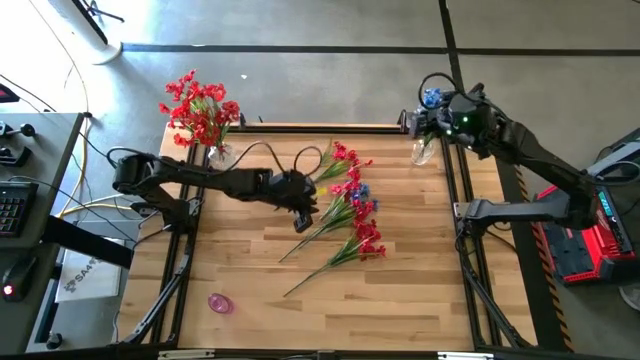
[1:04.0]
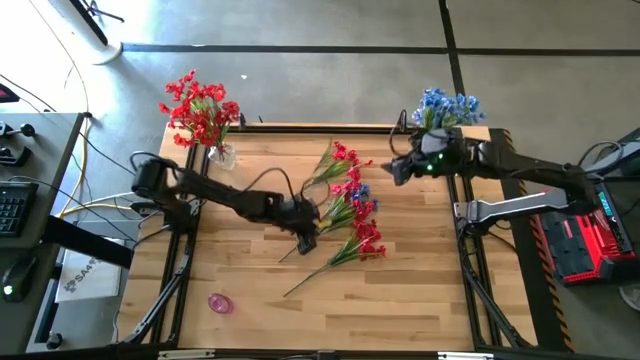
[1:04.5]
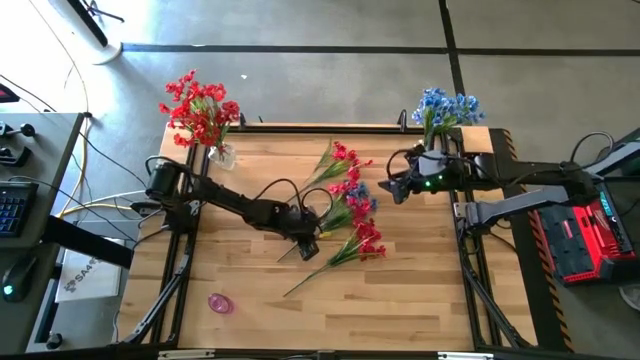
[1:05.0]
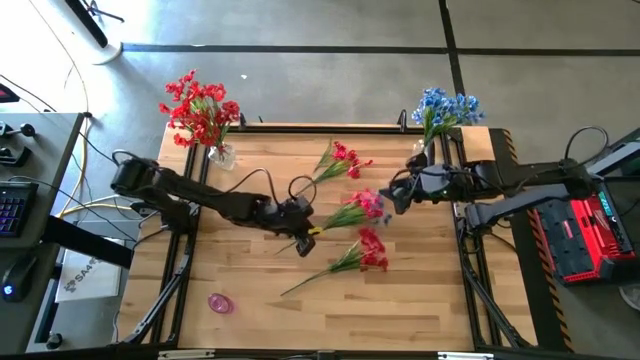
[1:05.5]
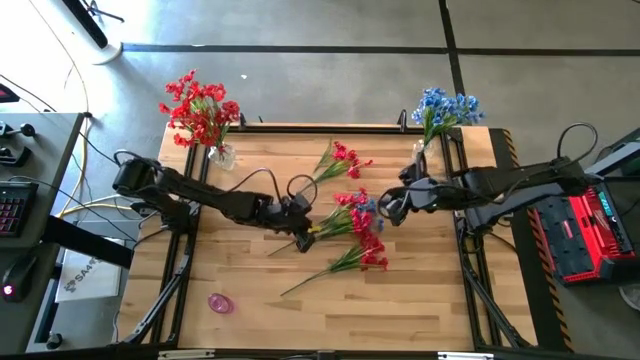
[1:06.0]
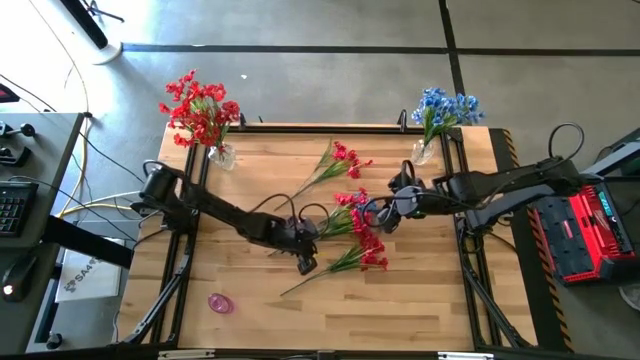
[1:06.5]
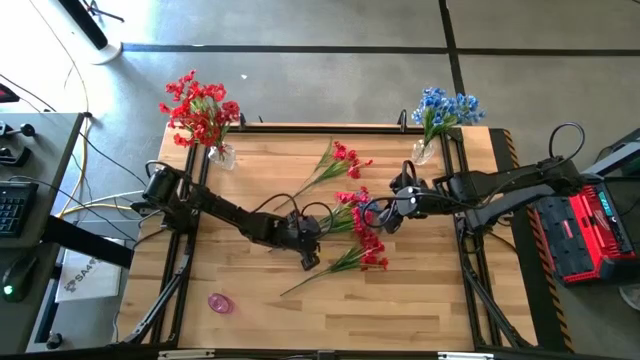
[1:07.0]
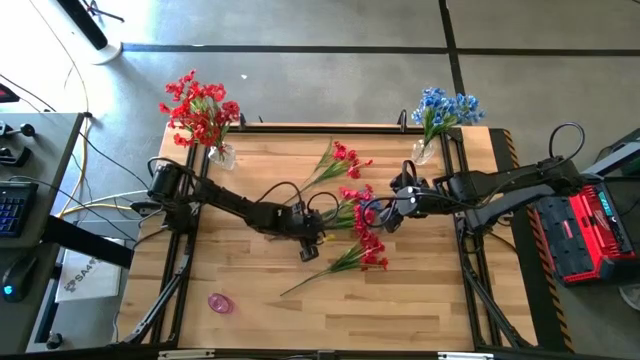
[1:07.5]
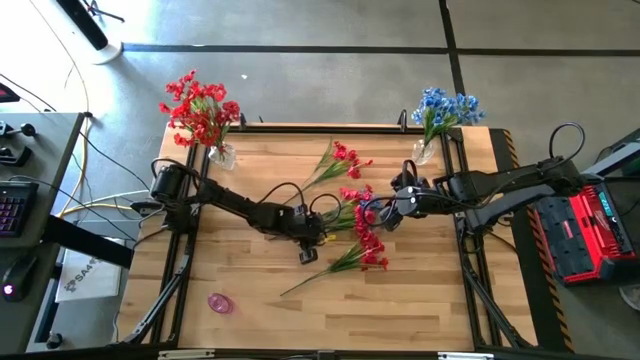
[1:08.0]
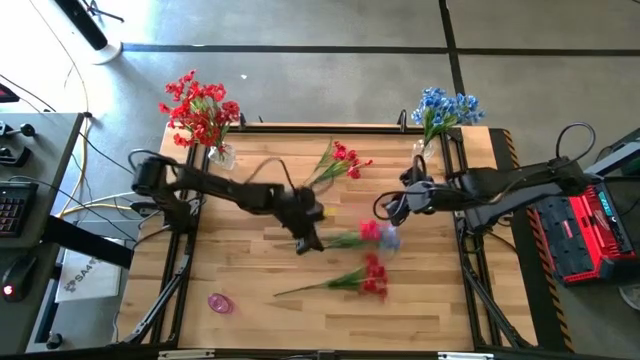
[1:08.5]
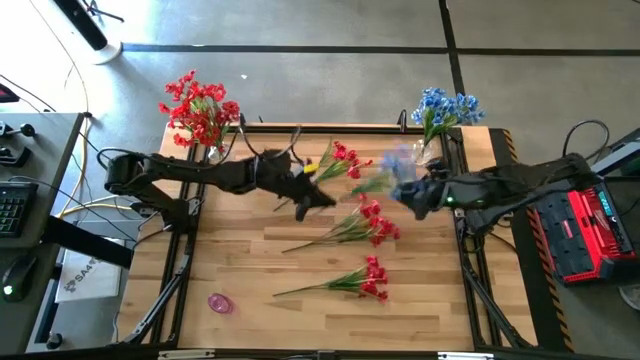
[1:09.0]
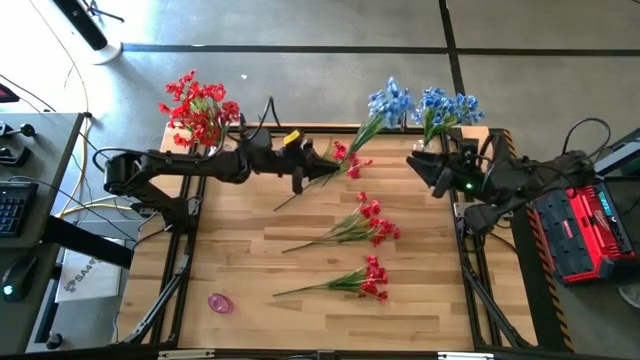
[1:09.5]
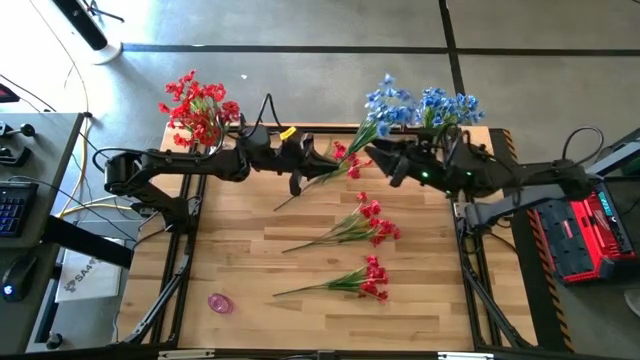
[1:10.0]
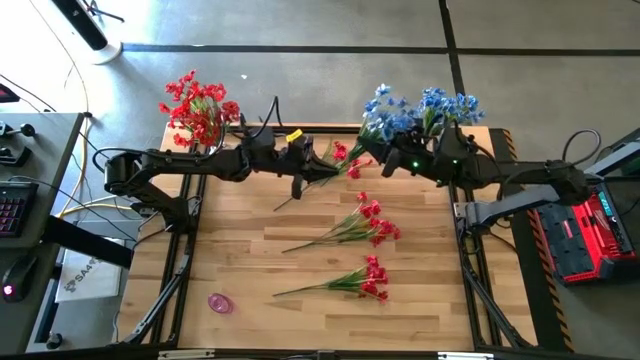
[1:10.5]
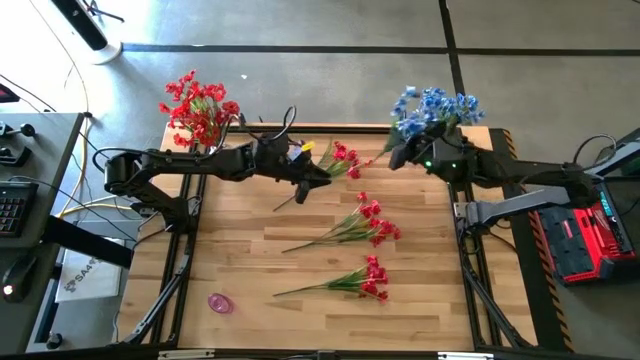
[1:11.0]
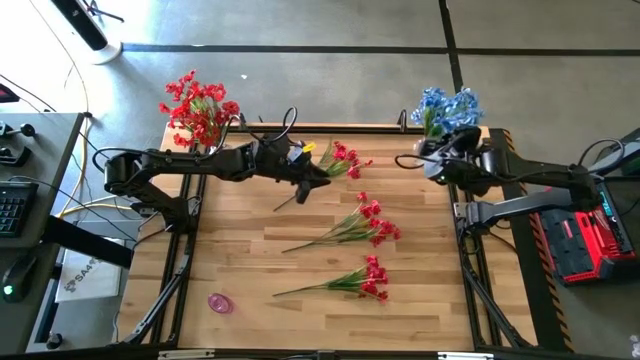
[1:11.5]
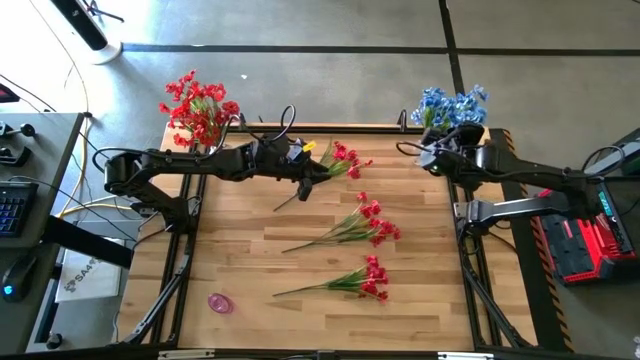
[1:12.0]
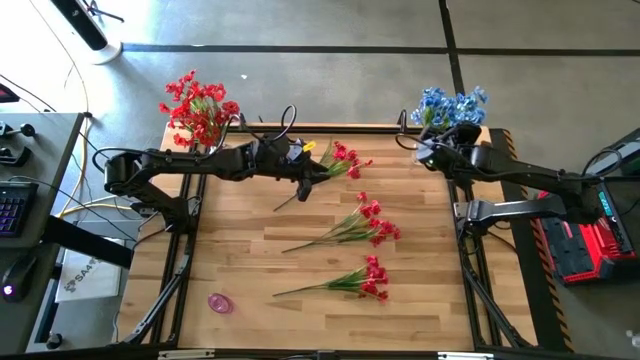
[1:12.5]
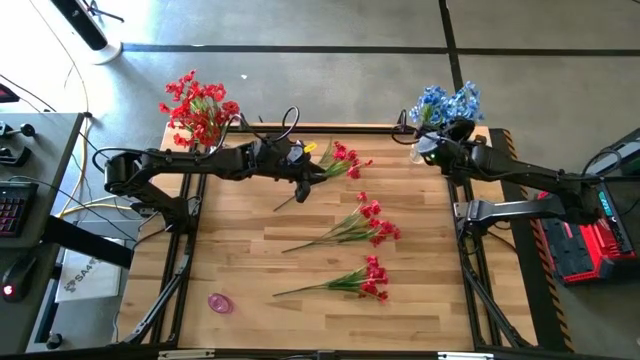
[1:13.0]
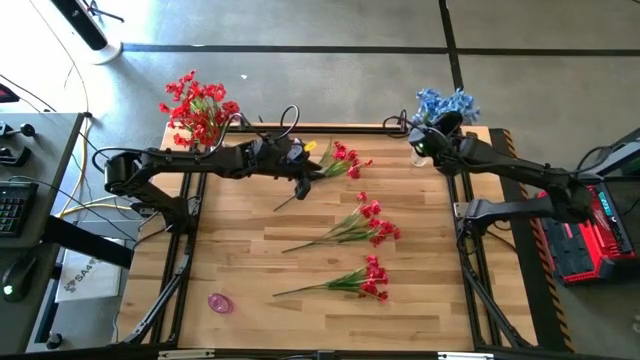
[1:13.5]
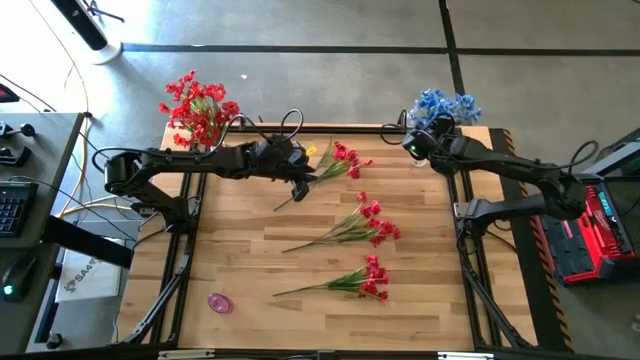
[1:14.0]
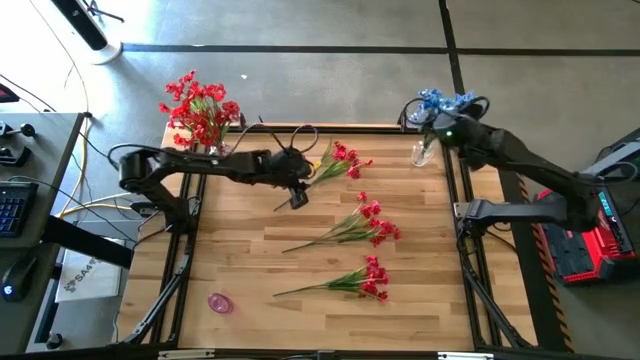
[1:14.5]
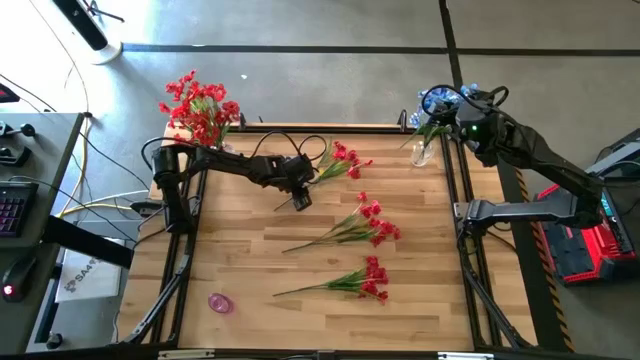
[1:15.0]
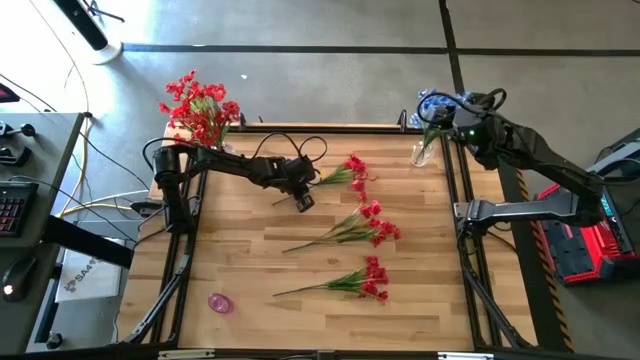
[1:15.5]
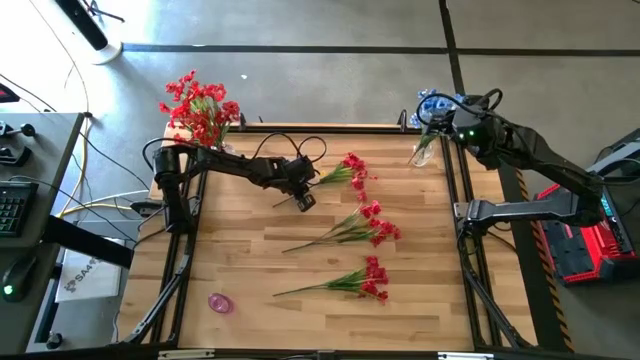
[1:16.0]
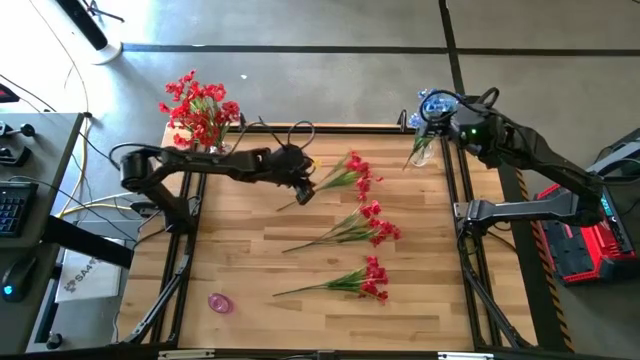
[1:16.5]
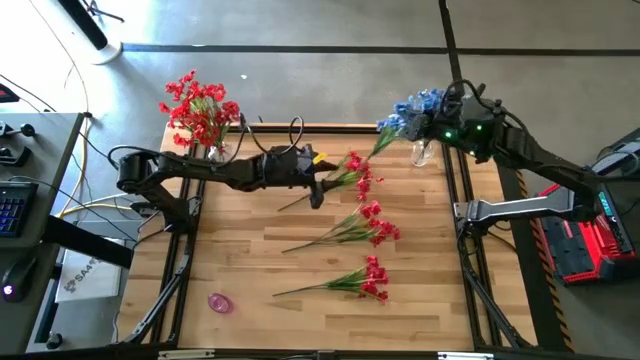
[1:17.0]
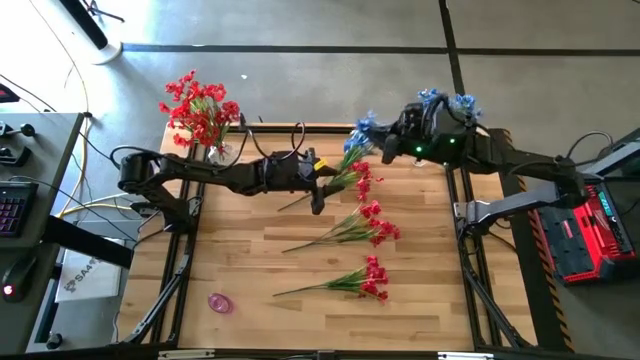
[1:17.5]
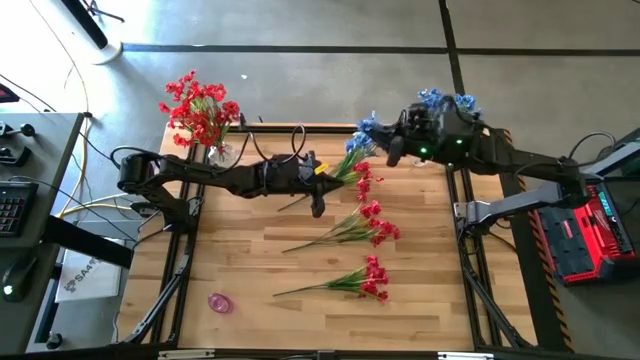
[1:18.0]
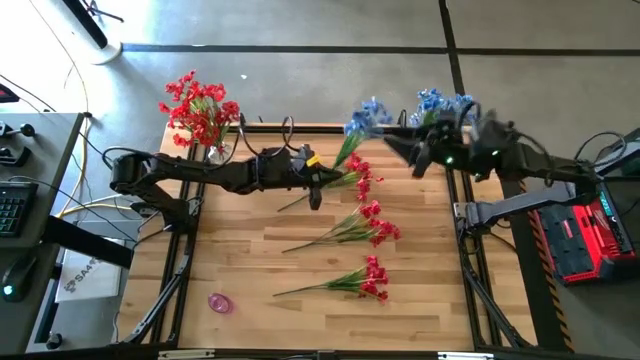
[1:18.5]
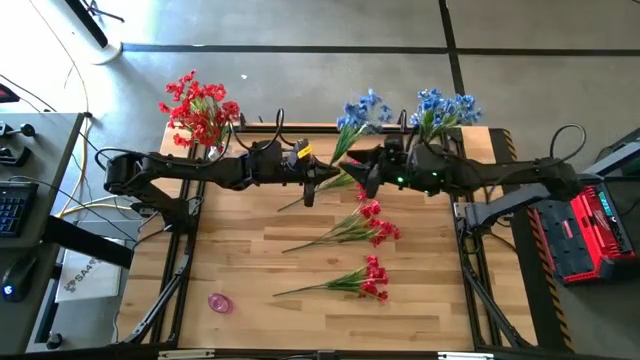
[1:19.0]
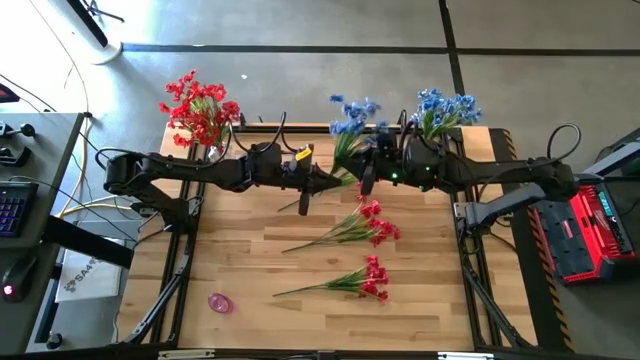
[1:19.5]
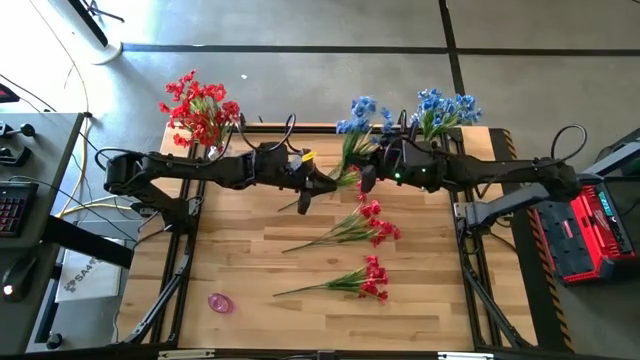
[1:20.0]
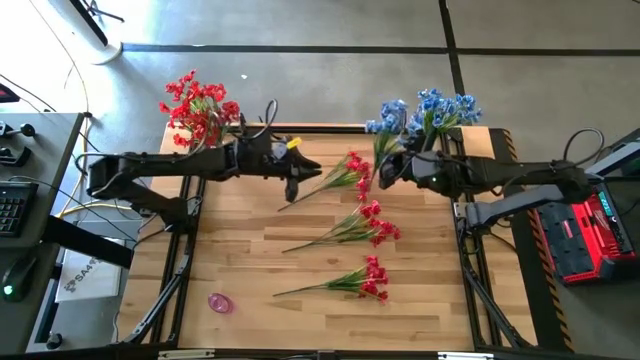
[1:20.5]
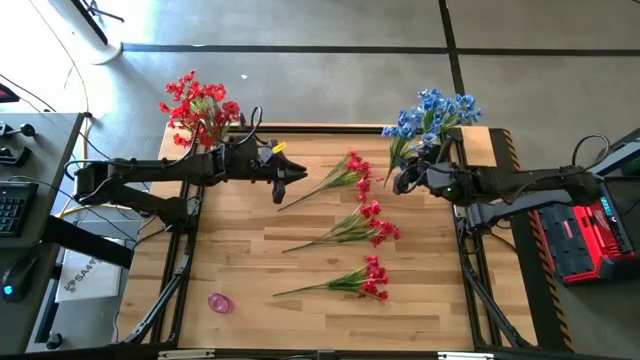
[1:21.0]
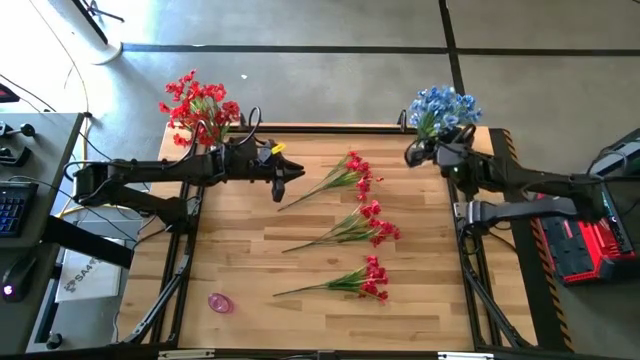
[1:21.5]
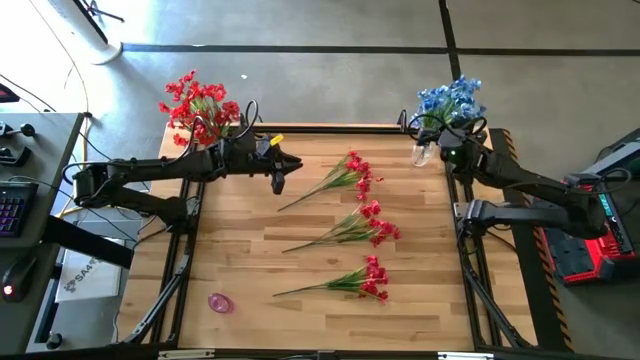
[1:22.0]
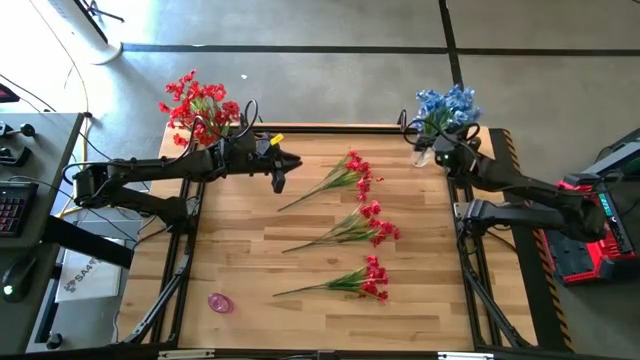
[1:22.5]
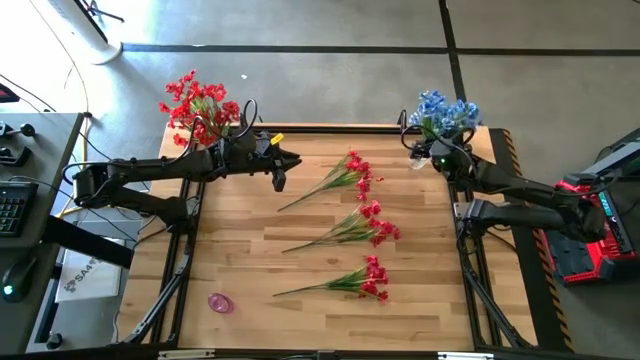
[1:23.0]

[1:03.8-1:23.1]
Task: Sort flowers into vase by color
Put the blue flower into the right transparent vase
